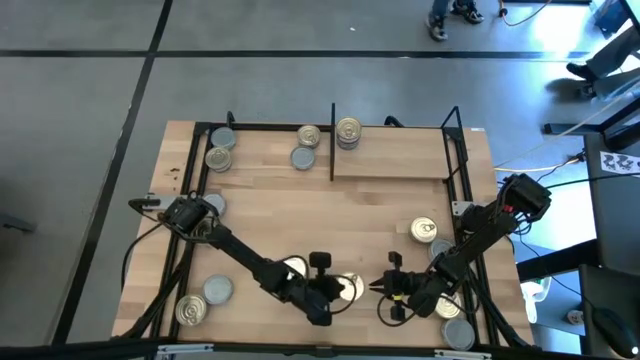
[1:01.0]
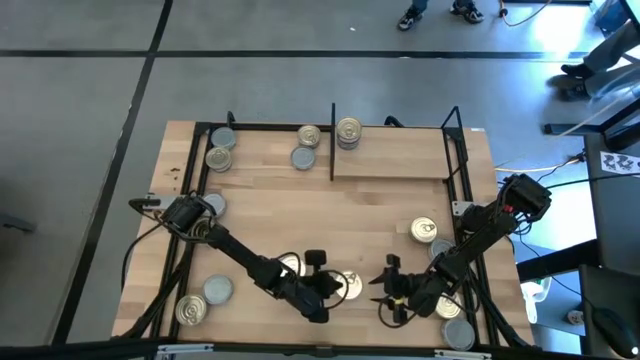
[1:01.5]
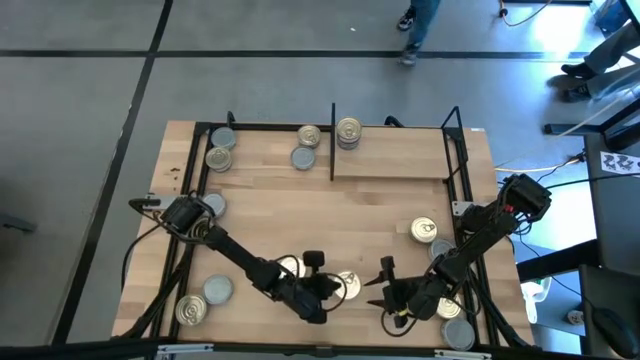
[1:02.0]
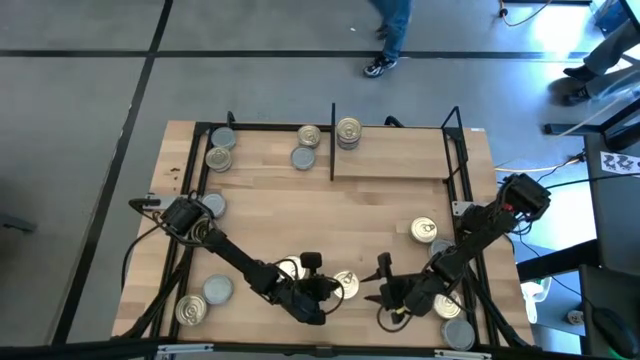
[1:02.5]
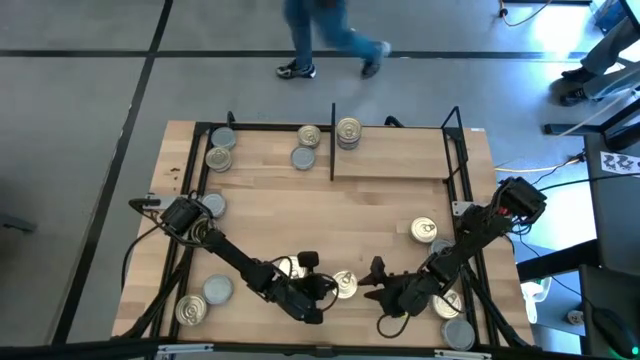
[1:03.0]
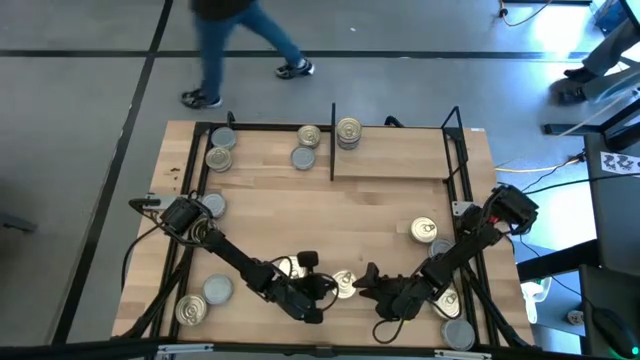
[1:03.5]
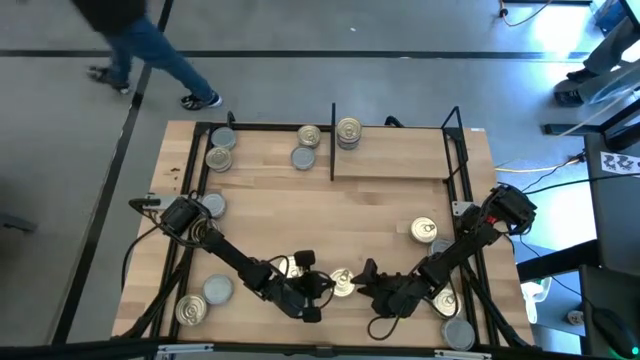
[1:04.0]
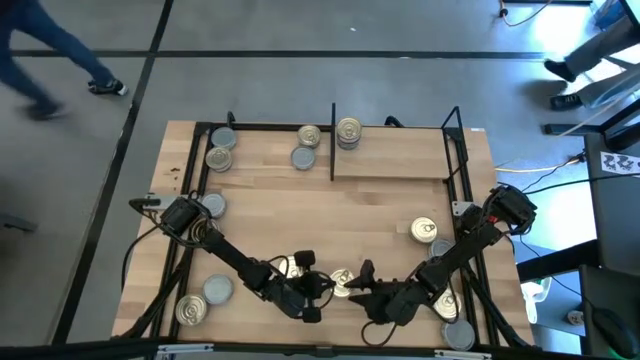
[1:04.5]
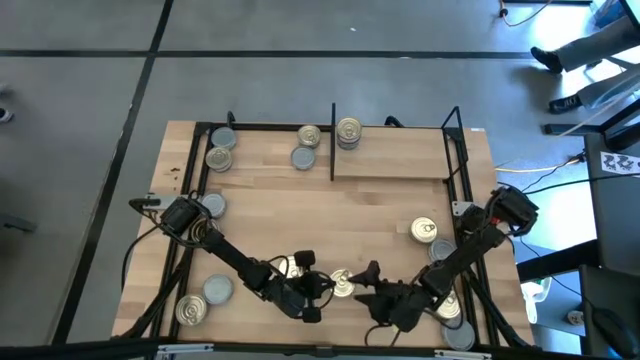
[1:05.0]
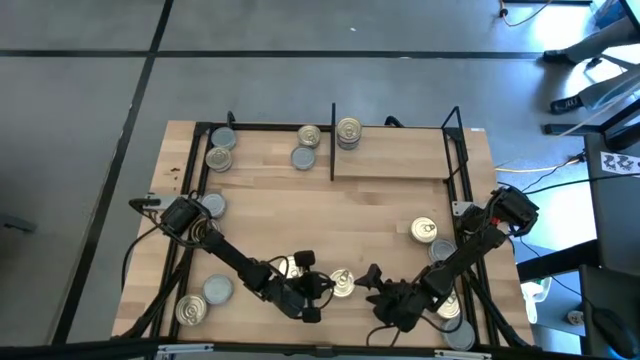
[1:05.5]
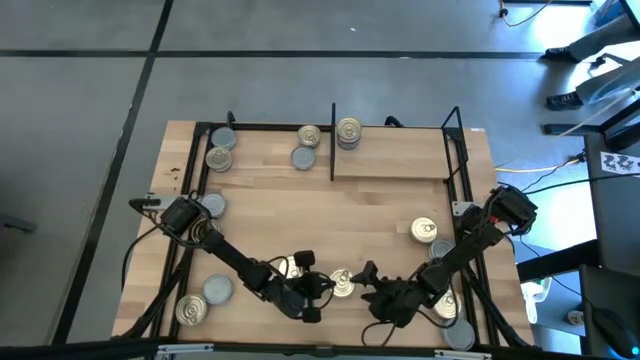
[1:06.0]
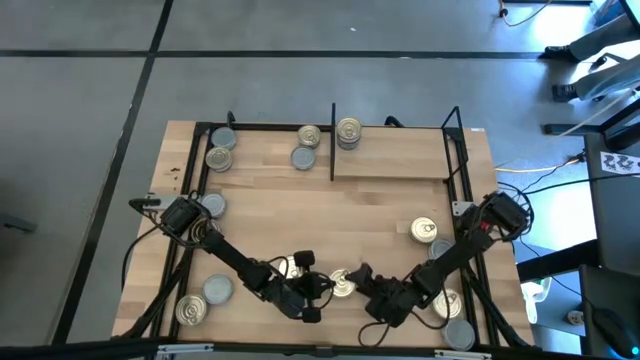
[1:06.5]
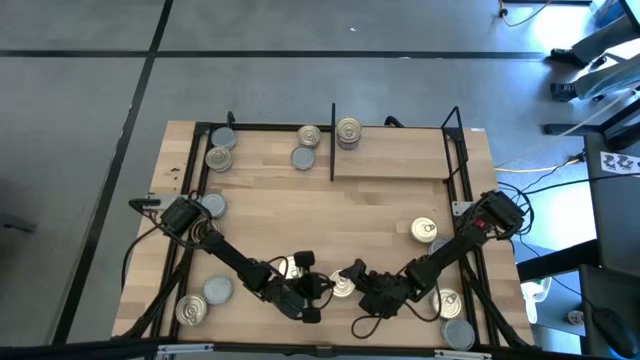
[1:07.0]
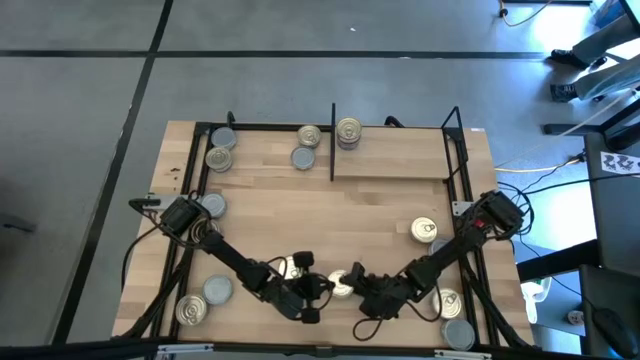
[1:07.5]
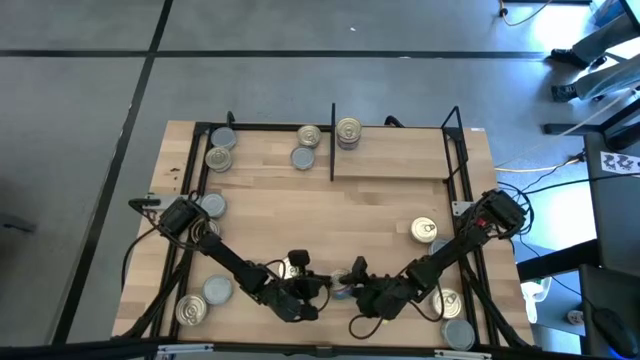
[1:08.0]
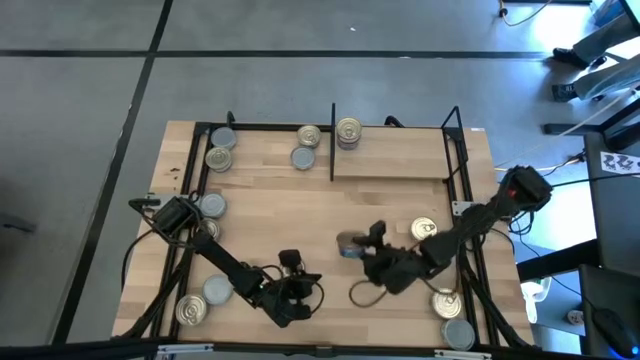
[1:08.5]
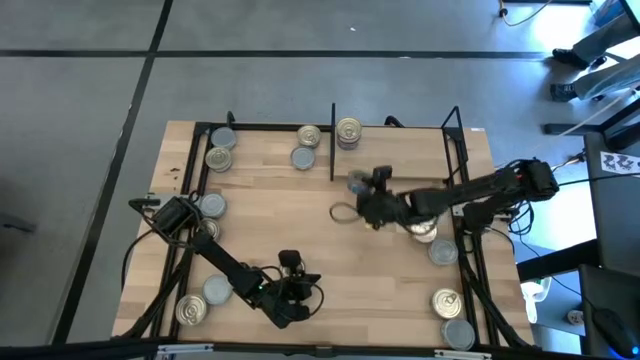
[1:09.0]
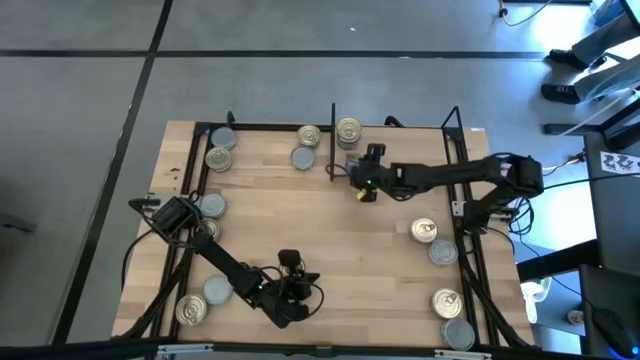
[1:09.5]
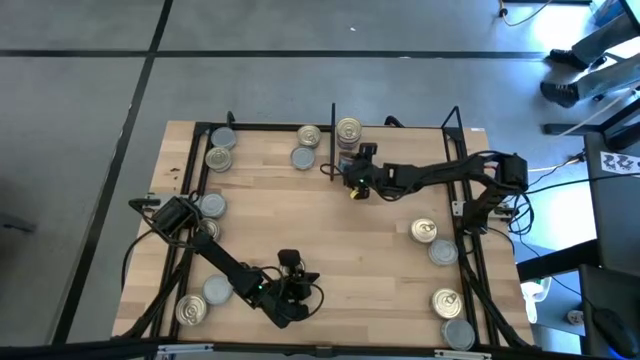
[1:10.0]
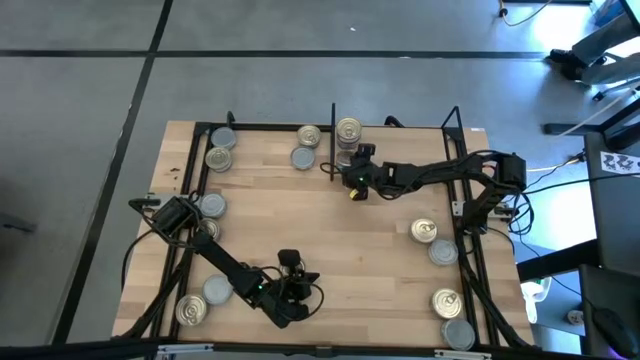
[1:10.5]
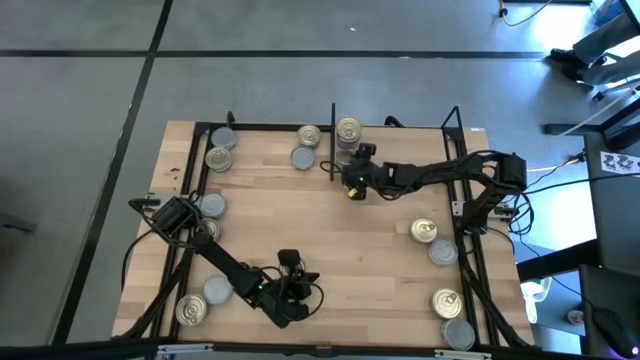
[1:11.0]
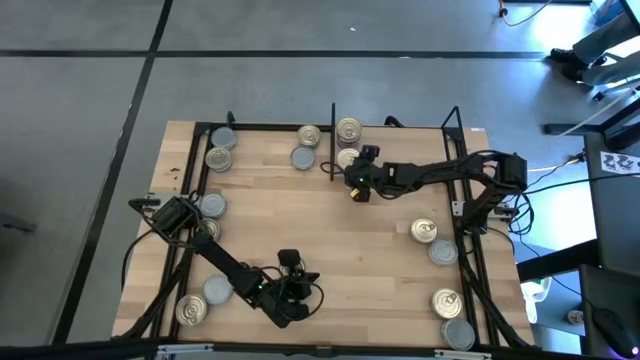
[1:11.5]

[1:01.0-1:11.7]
Task: Stack canned seafood by type on shelf
Put the blue tuna can on the shelf

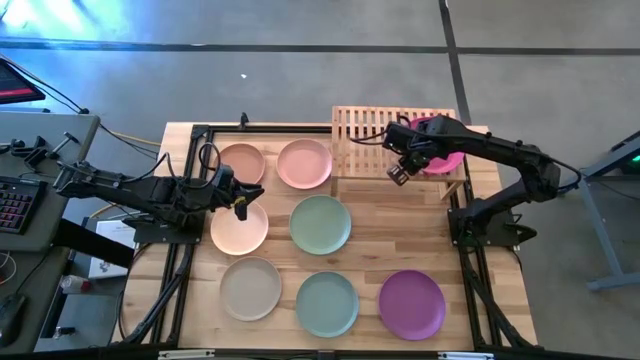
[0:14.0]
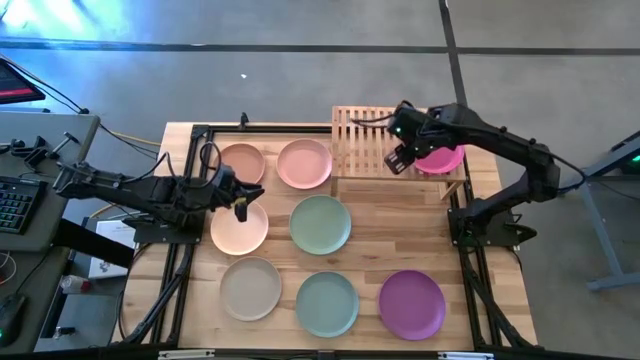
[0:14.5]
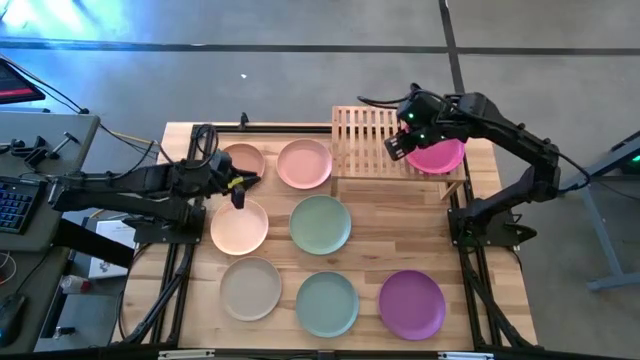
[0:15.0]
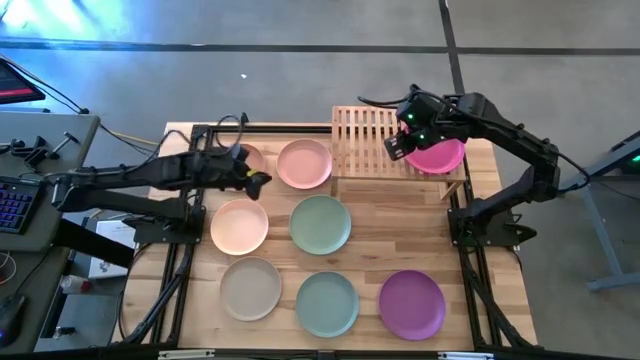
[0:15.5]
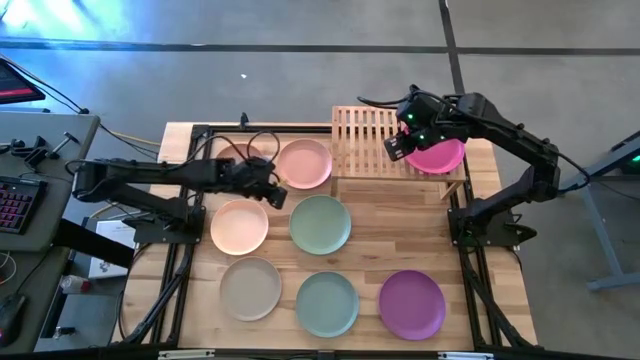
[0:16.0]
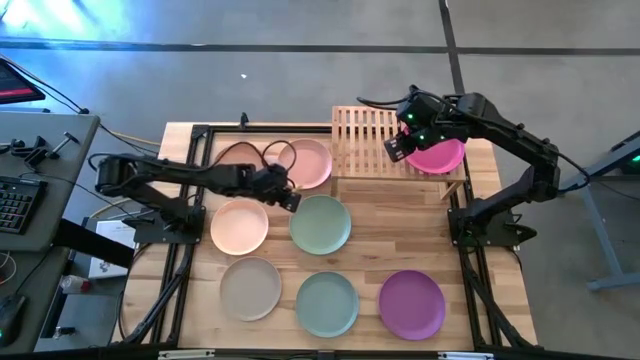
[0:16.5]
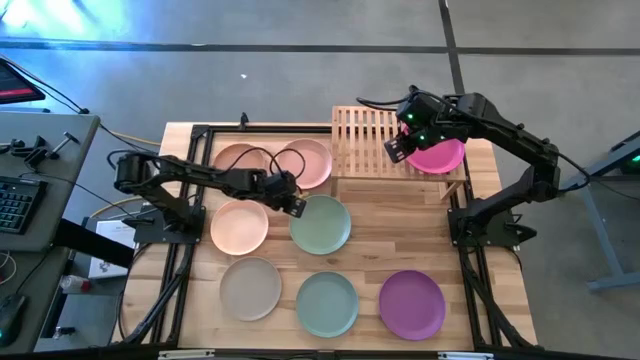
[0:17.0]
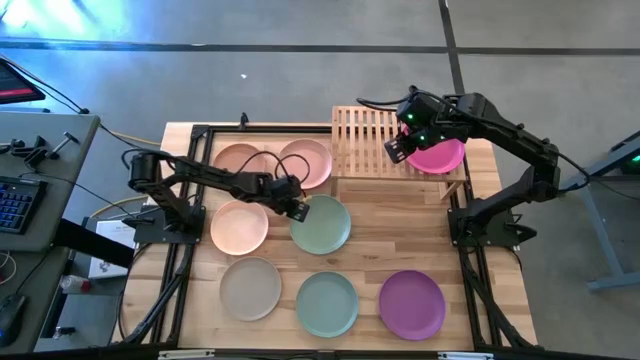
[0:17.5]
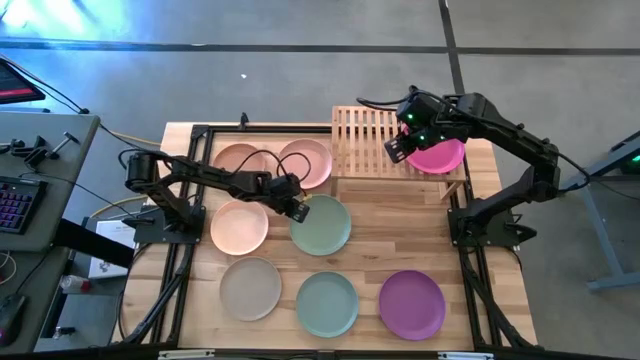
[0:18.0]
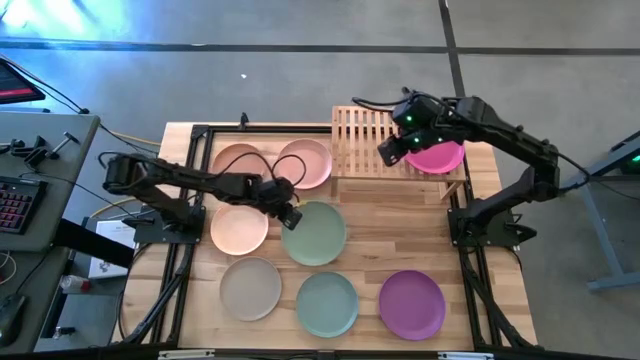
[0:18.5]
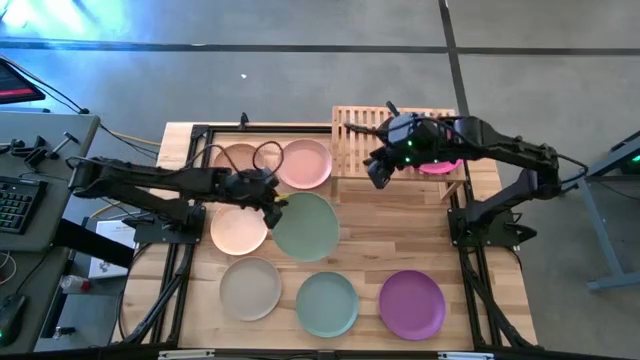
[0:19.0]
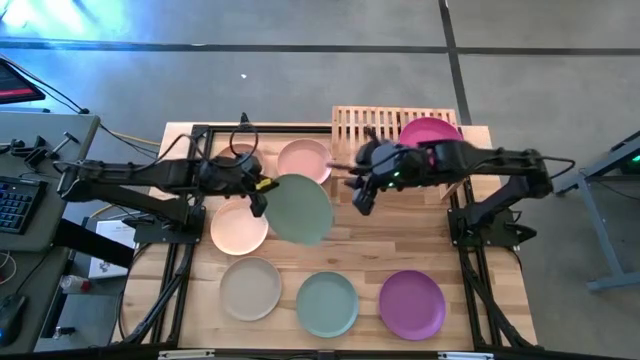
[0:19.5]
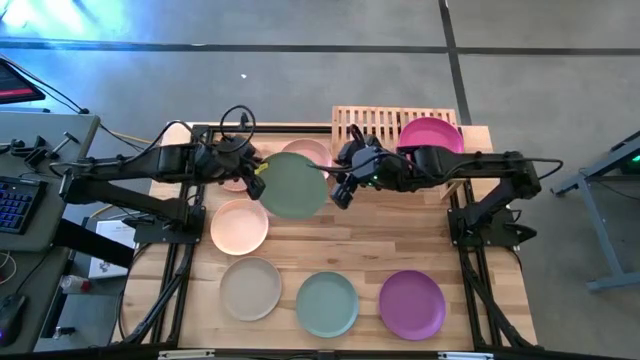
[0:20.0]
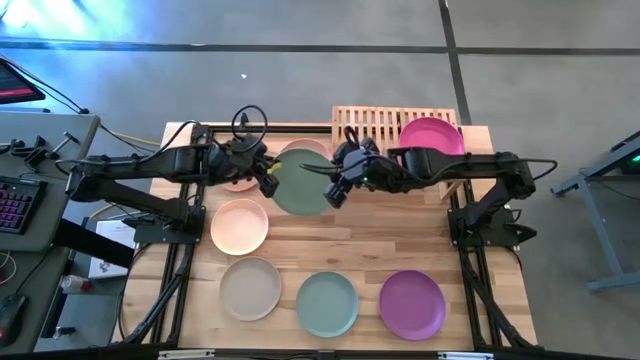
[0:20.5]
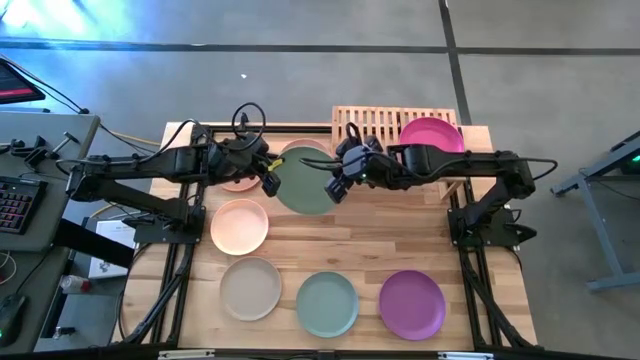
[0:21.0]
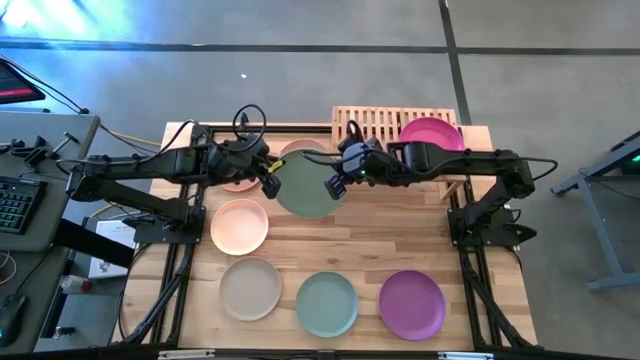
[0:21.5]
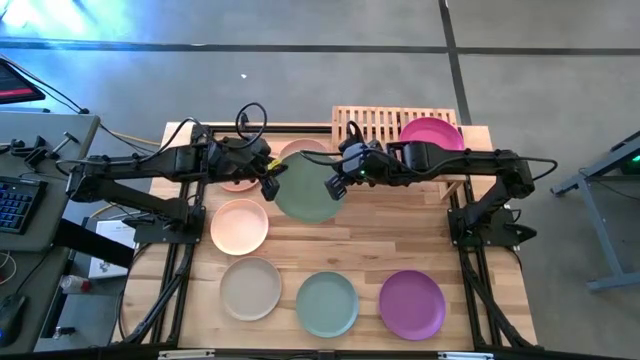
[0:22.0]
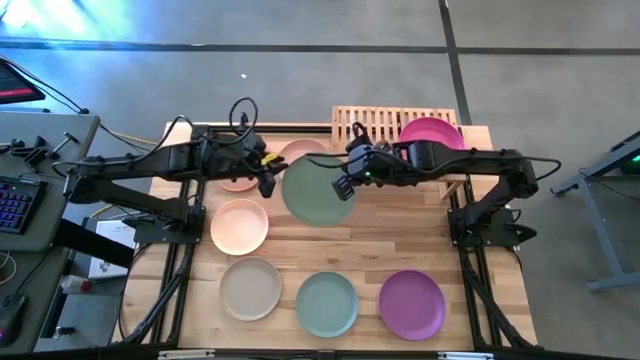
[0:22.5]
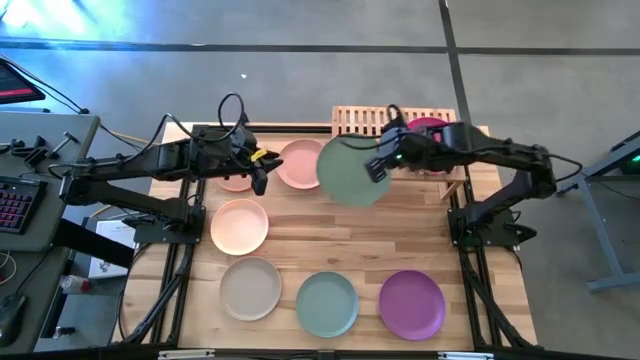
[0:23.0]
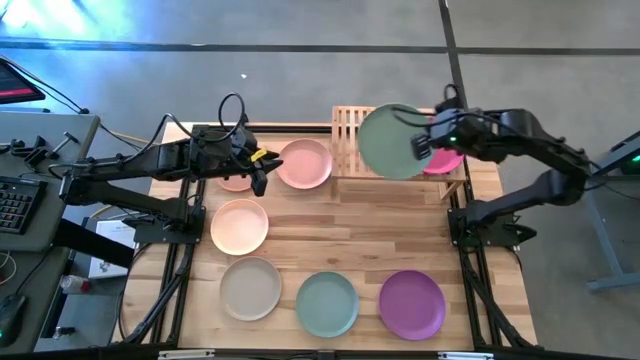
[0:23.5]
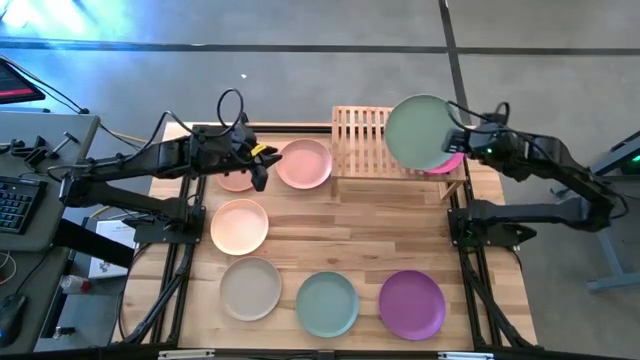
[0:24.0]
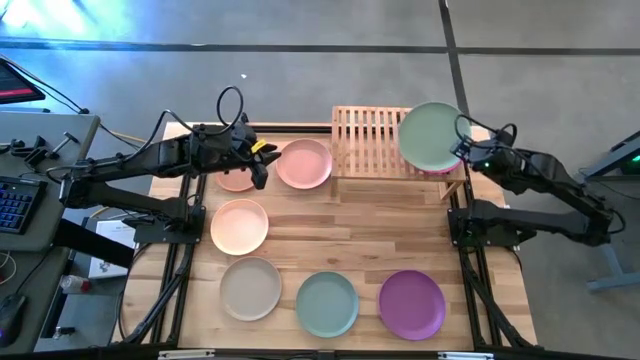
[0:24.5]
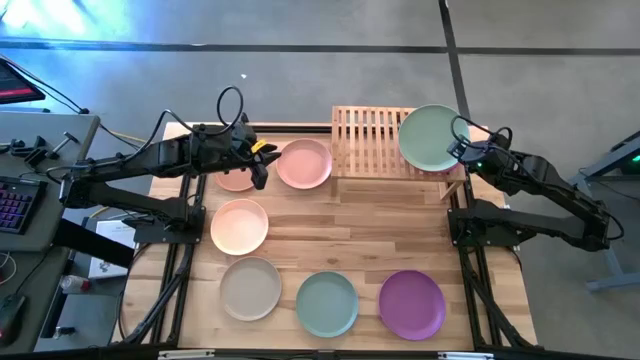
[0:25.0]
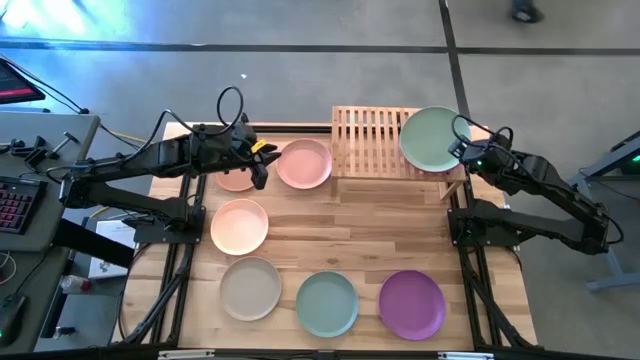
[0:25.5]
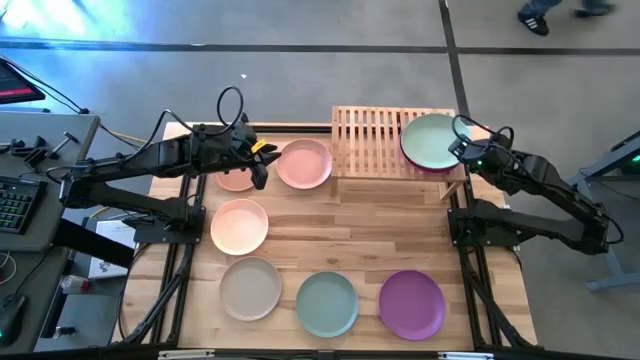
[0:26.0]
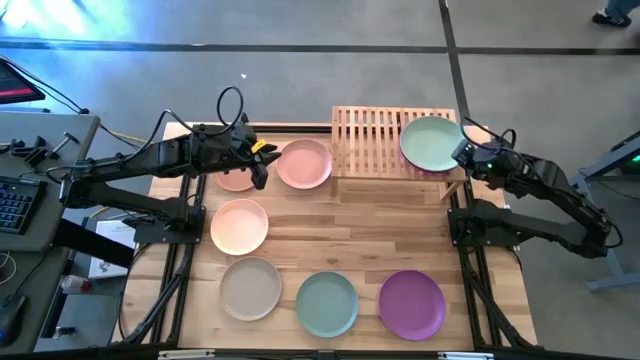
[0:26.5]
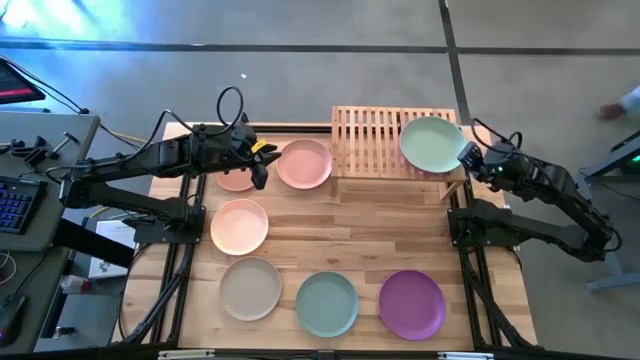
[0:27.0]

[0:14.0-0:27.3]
Task: Place and stack plates onto a shelf
Stack the green plate on top of the pink plate on the shelf
